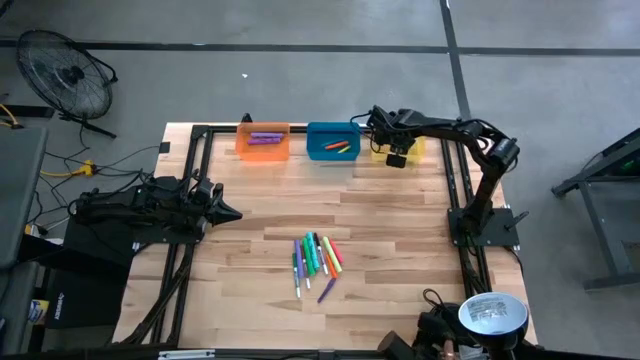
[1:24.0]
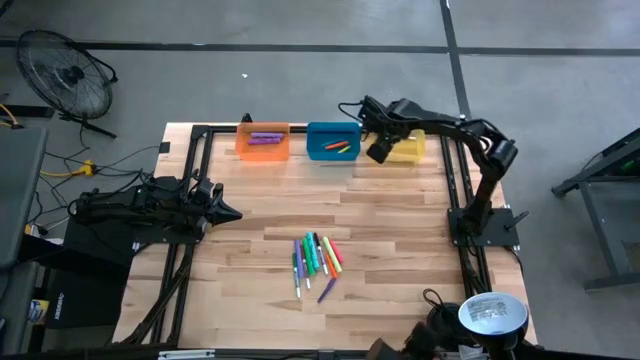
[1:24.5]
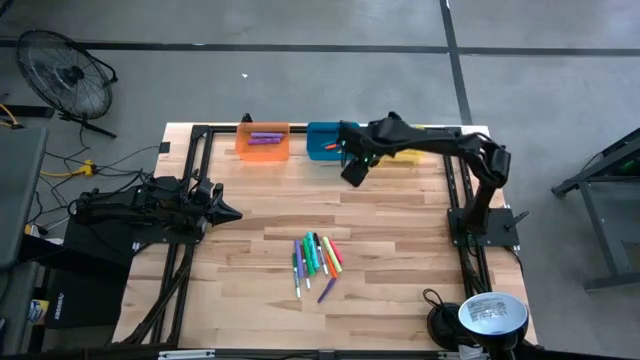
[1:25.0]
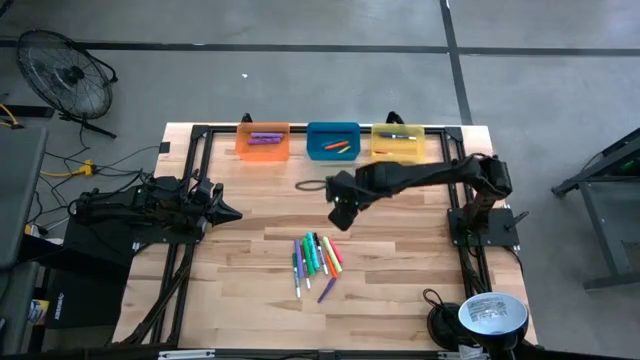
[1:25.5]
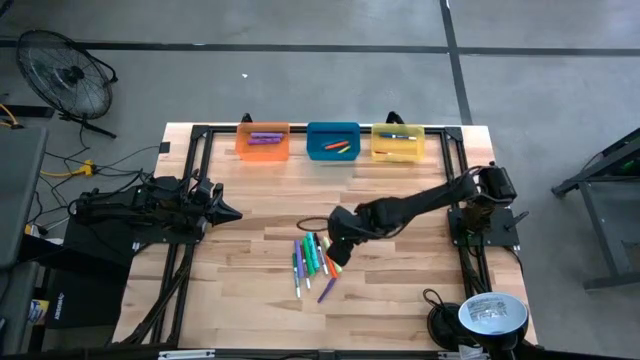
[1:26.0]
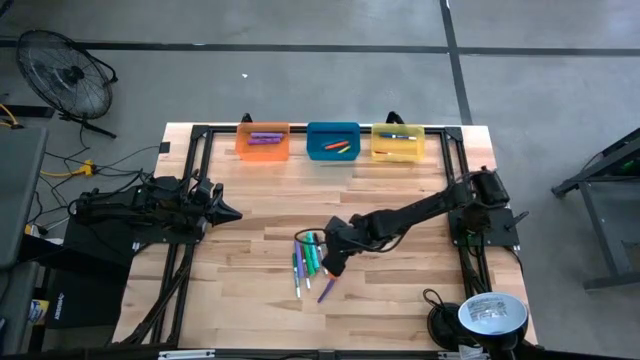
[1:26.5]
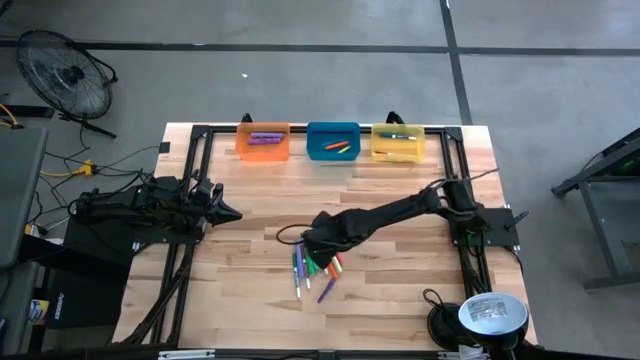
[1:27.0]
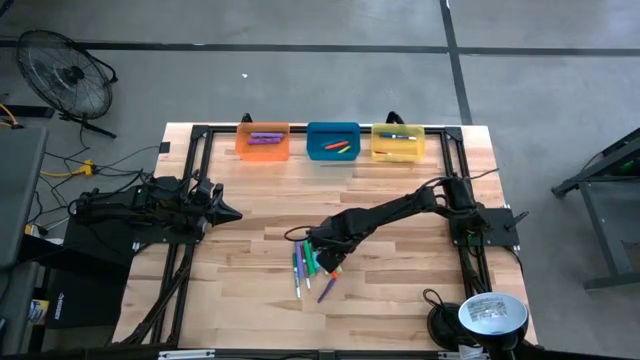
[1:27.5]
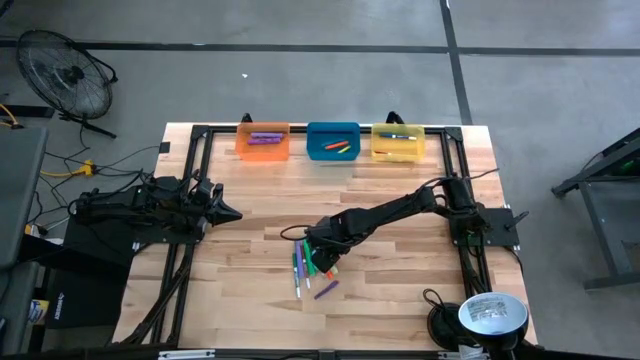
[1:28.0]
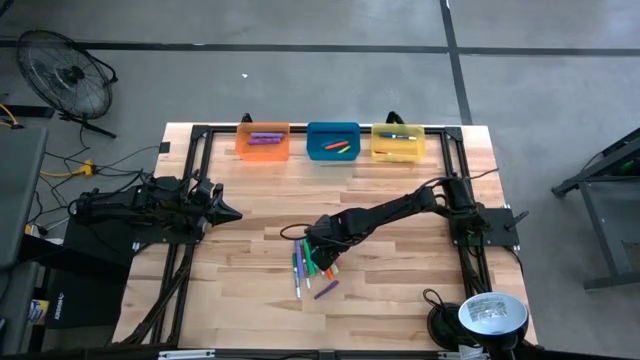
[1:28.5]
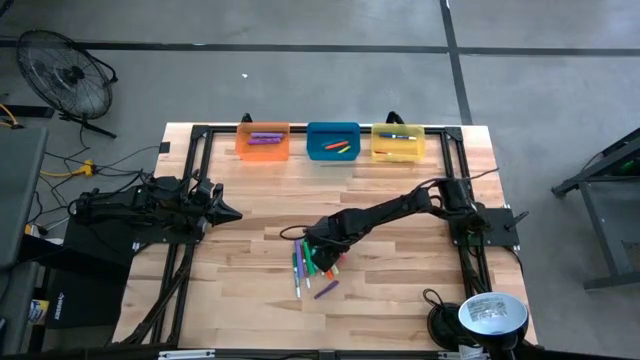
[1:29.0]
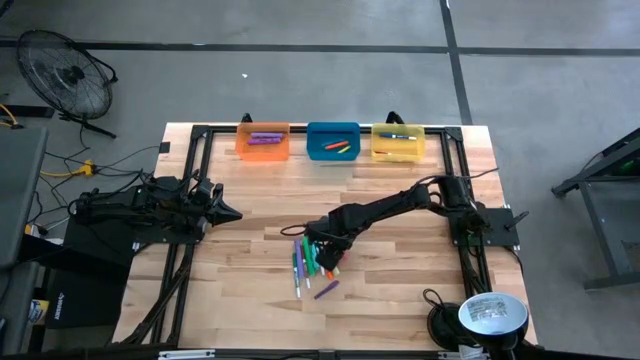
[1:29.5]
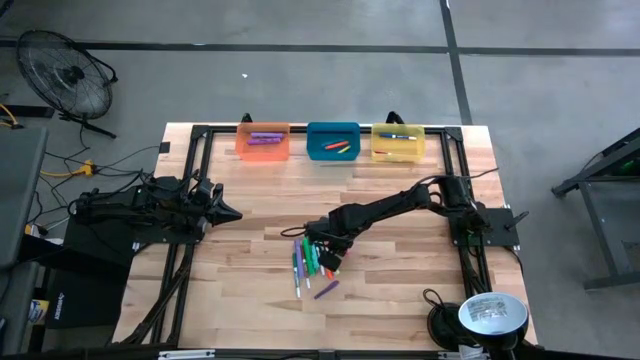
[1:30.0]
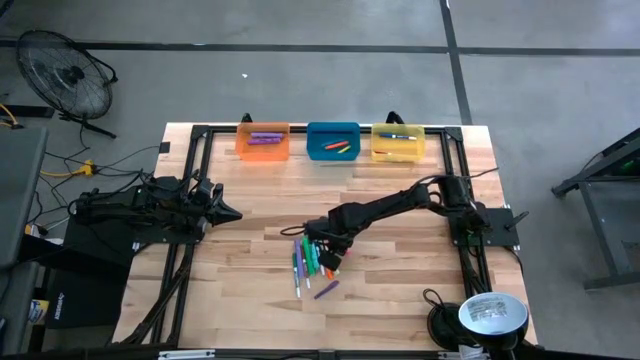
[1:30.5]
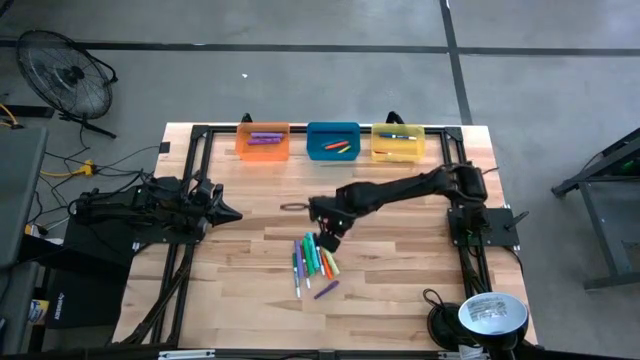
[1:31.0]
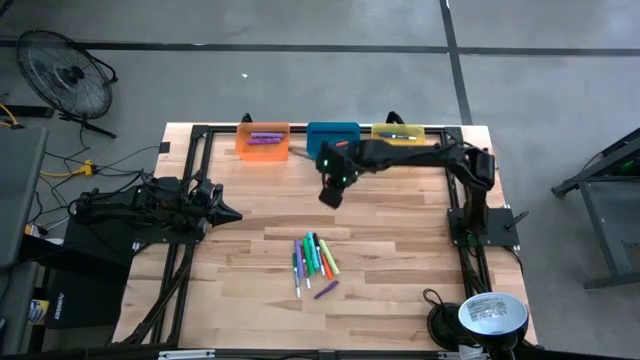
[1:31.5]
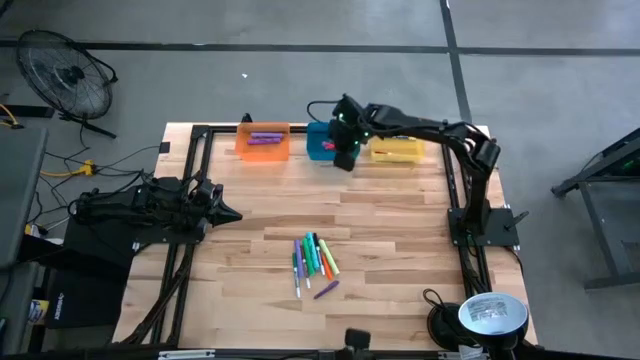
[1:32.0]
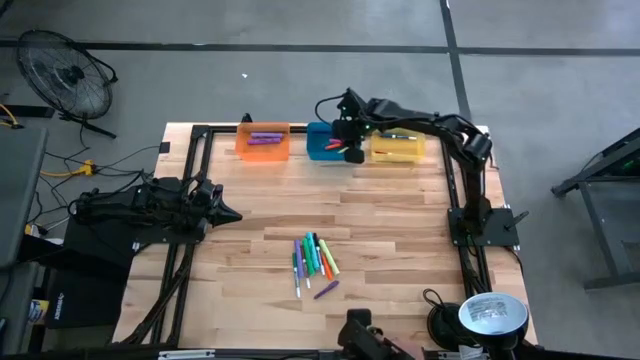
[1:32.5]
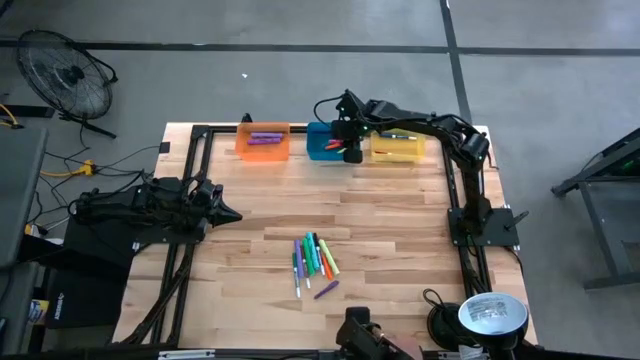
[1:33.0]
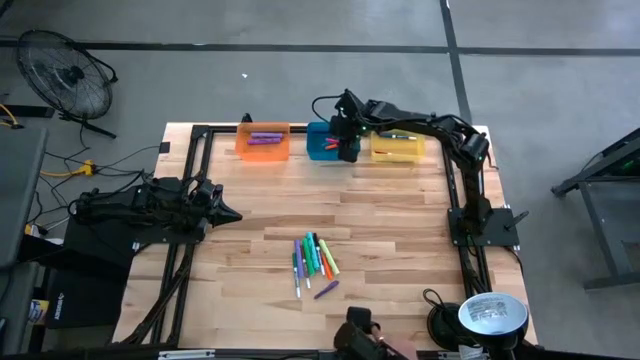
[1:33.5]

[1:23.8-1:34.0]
Task: Pick & Place Markers
Put the pink pen into the blue bin

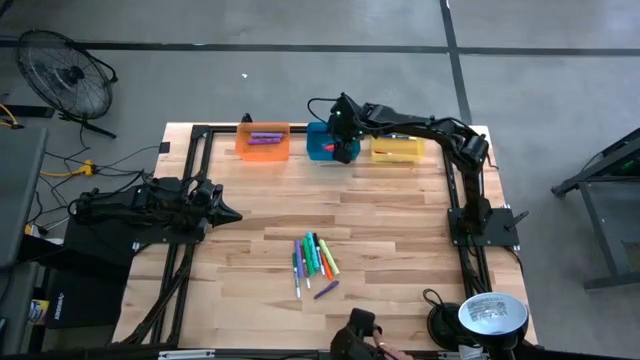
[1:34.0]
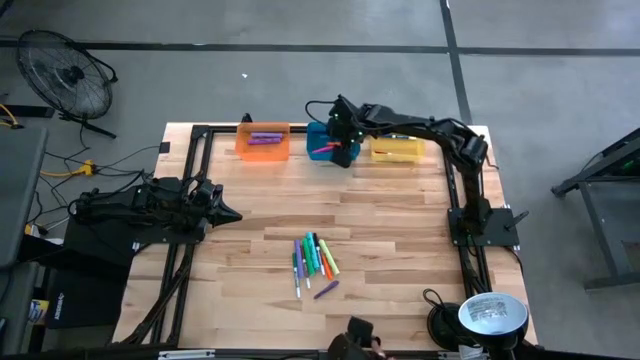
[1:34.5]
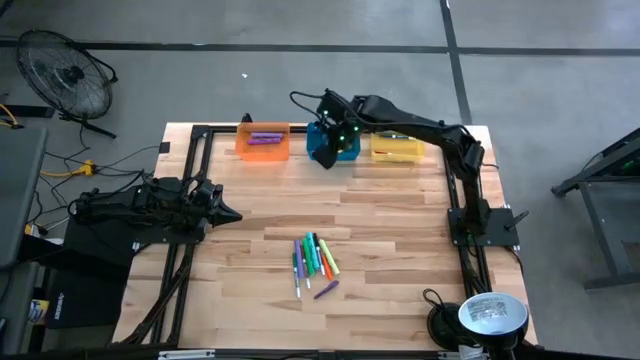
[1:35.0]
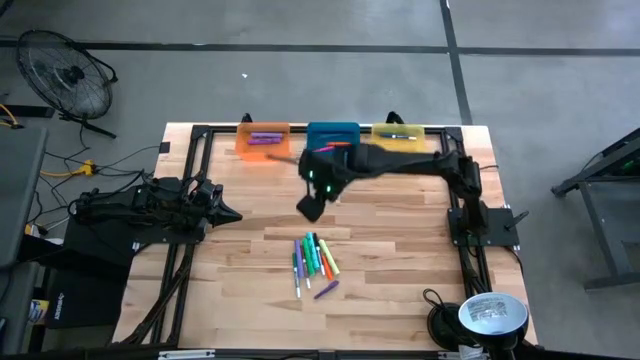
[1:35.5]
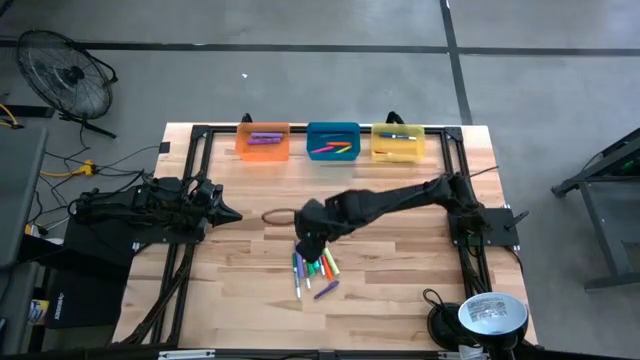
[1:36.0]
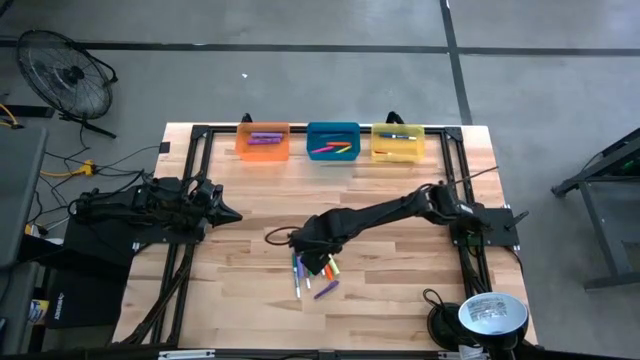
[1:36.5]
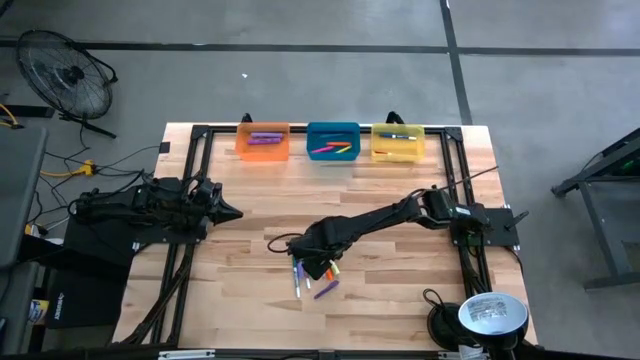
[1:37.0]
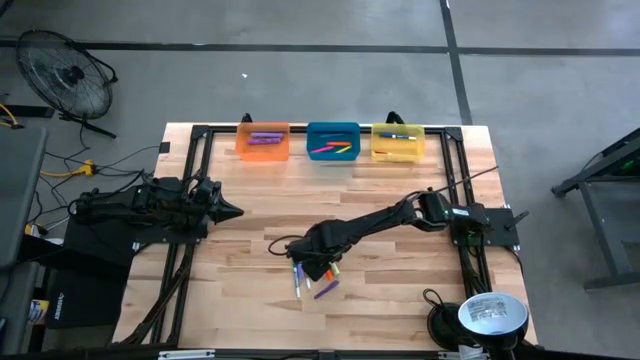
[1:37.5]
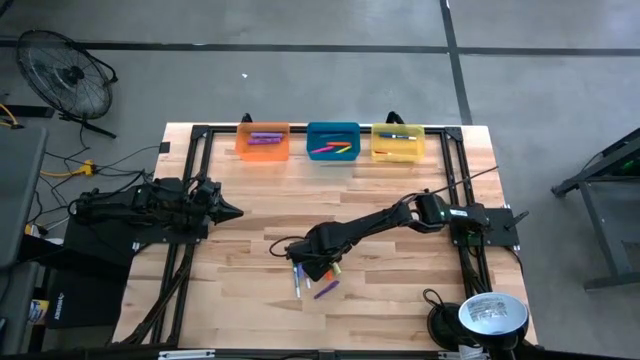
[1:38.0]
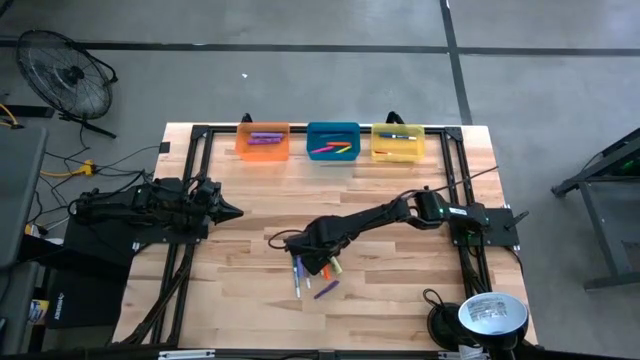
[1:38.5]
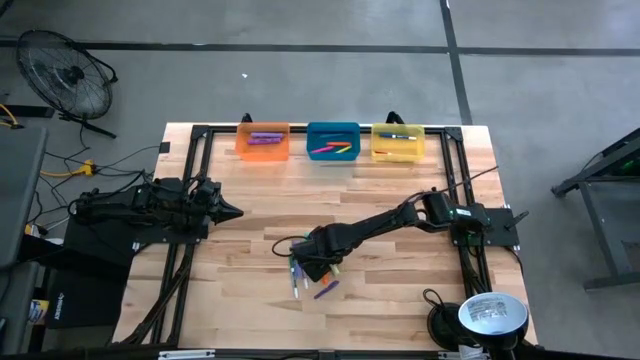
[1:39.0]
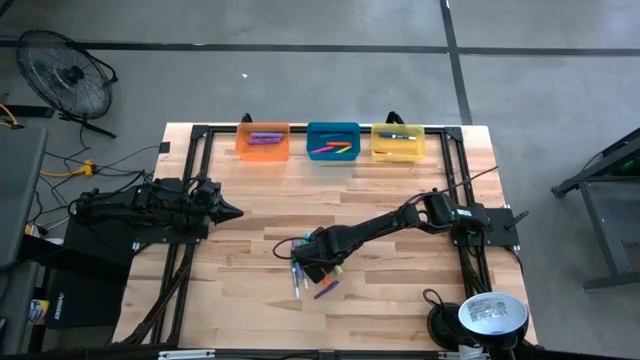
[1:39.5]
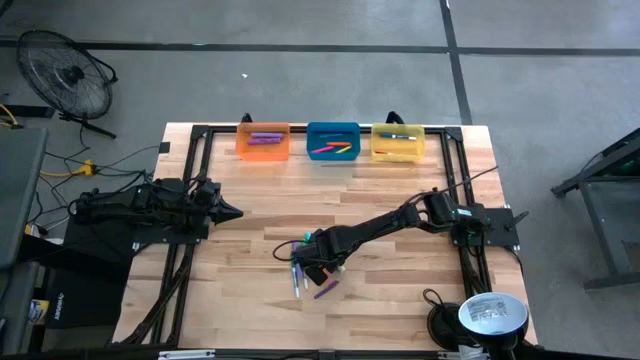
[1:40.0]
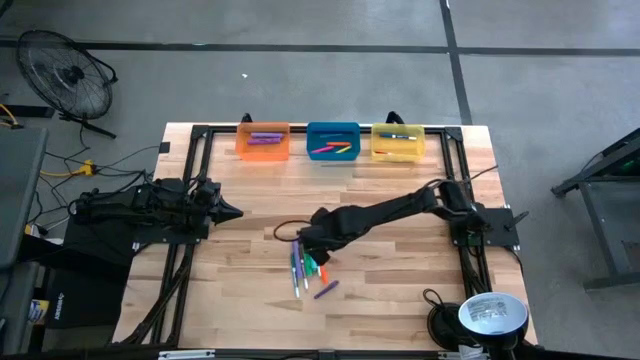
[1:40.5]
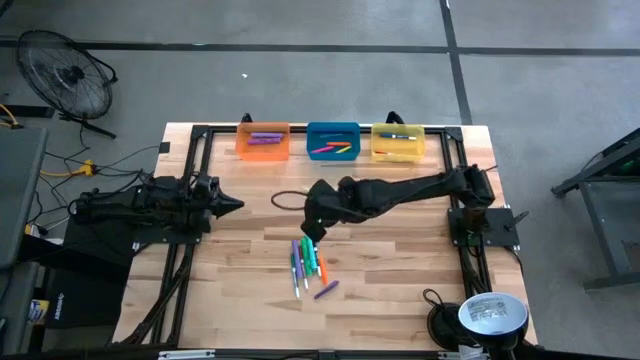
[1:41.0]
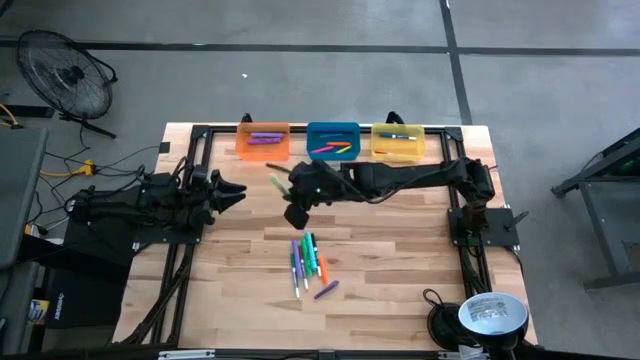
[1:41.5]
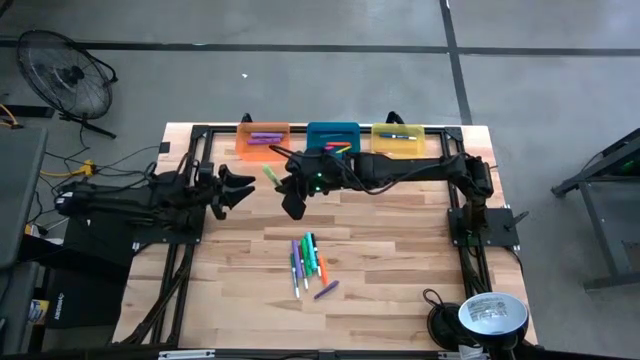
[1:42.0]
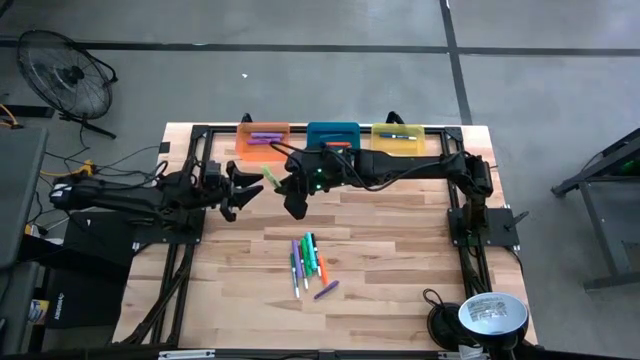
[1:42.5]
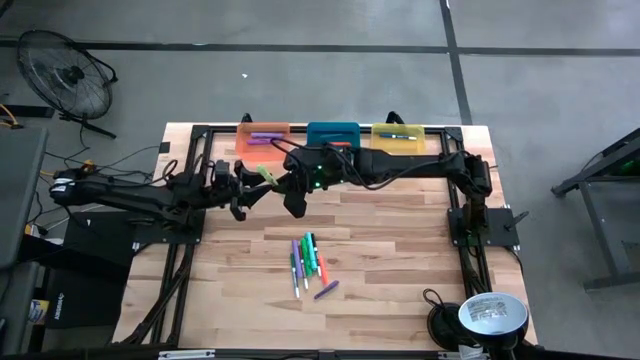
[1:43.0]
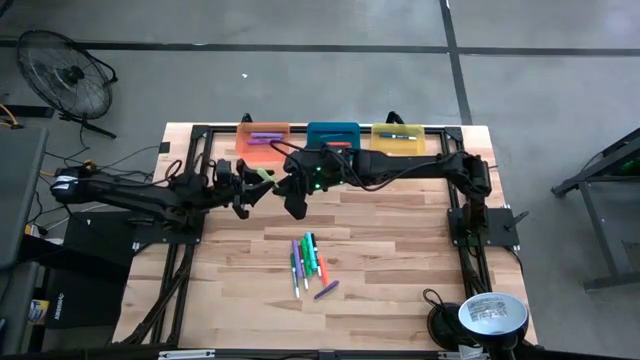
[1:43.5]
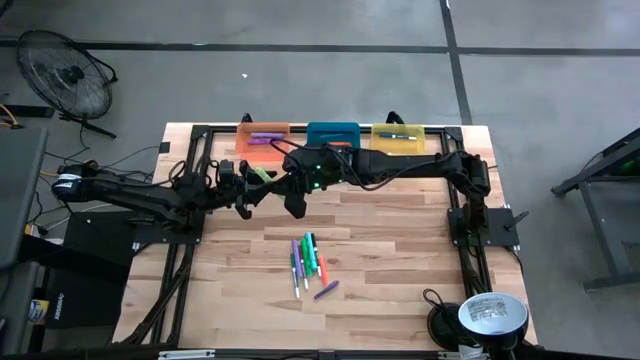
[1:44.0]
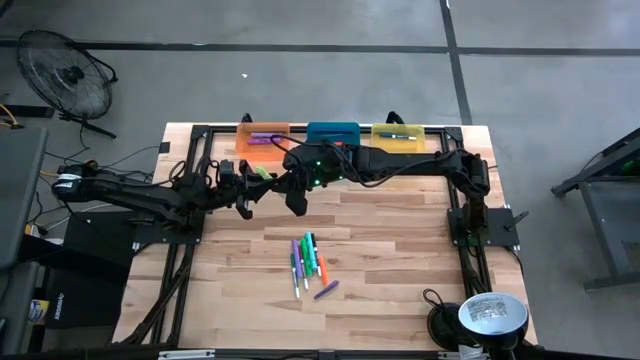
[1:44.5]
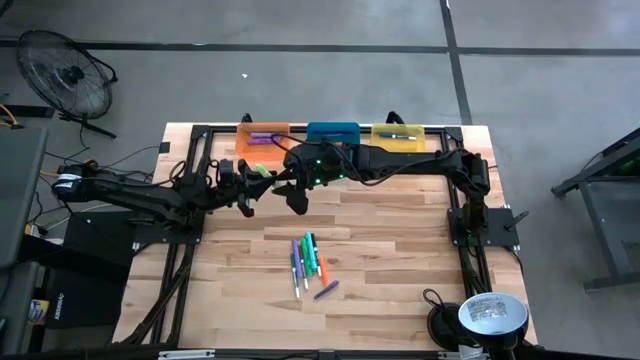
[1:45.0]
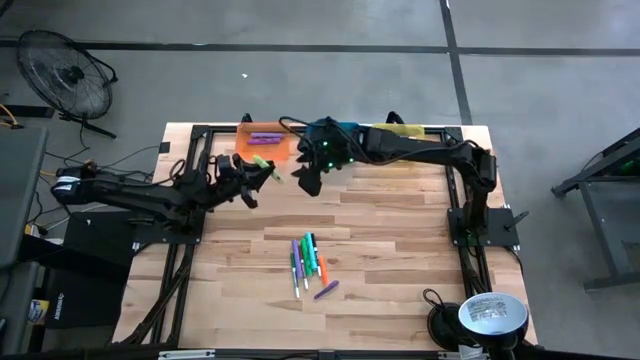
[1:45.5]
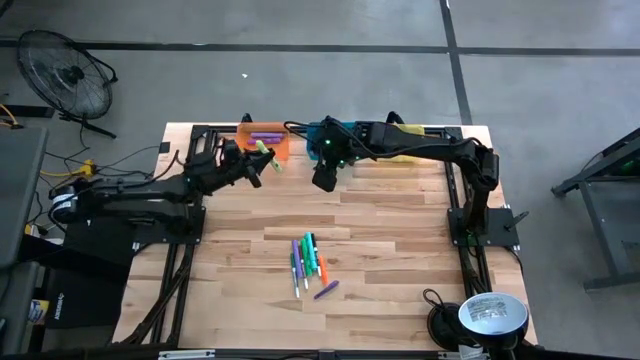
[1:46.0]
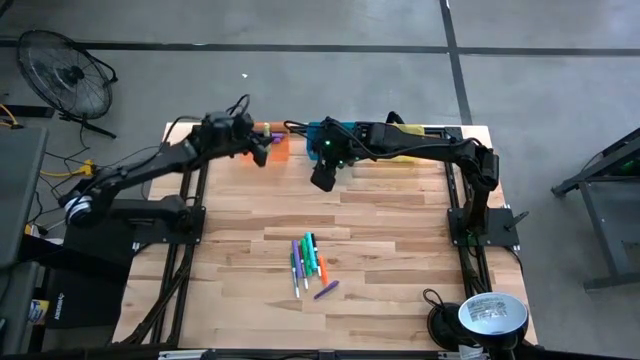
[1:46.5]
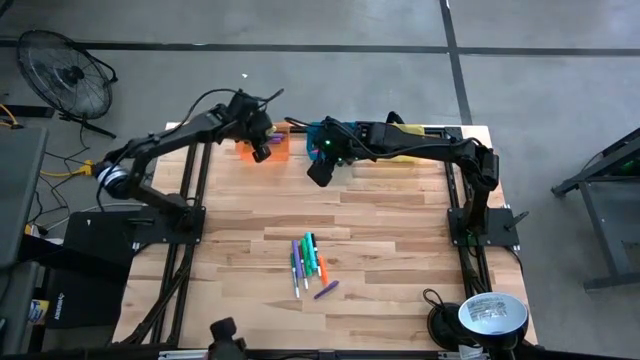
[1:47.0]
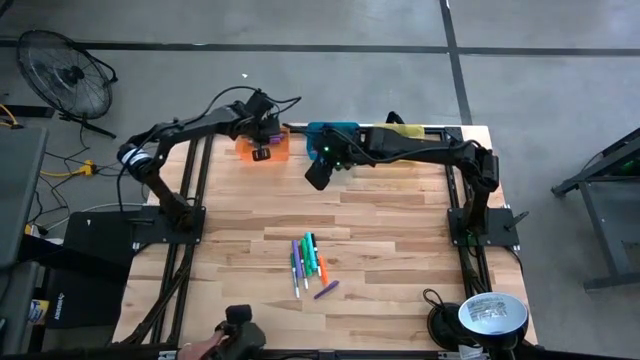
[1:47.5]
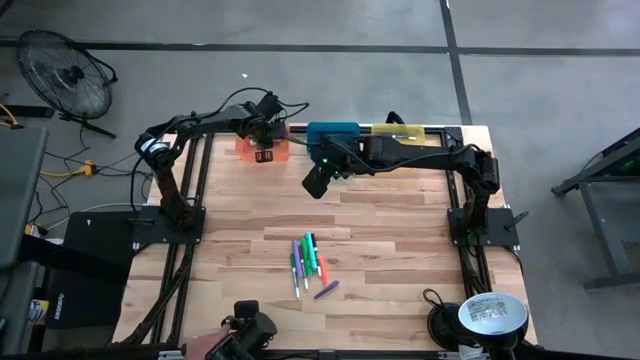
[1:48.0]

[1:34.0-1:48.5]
Put the light green highlighter into the orange bin
